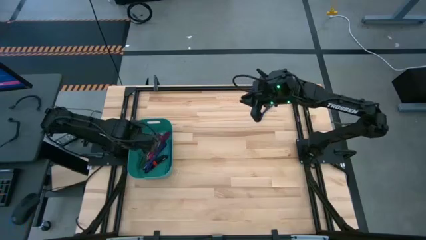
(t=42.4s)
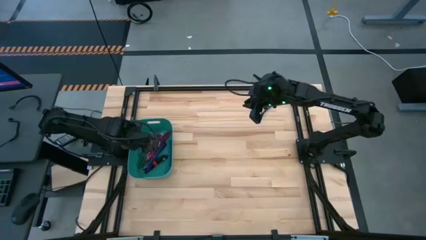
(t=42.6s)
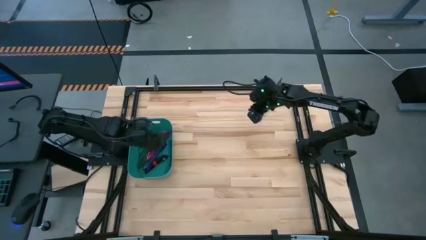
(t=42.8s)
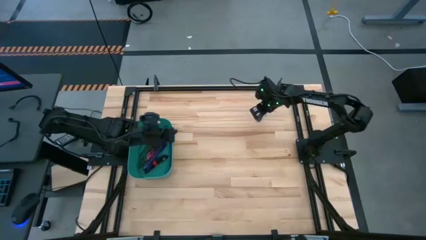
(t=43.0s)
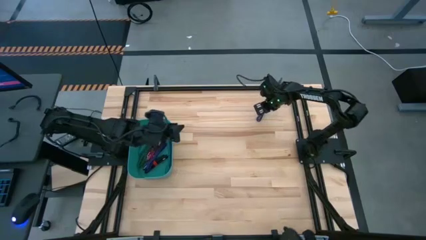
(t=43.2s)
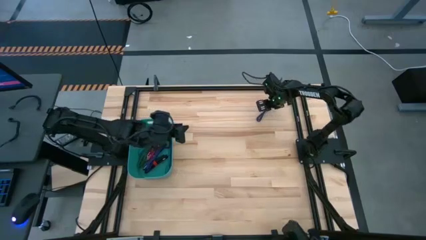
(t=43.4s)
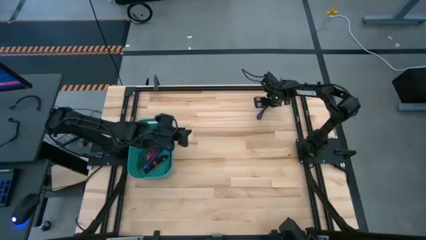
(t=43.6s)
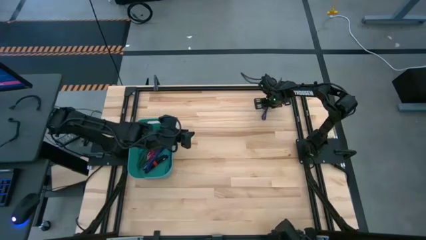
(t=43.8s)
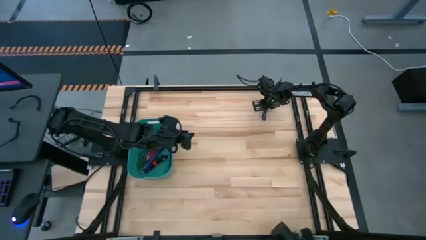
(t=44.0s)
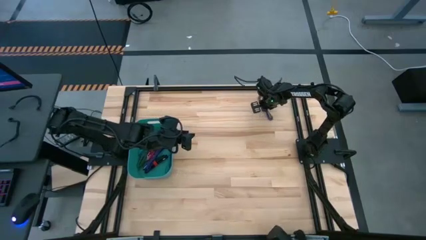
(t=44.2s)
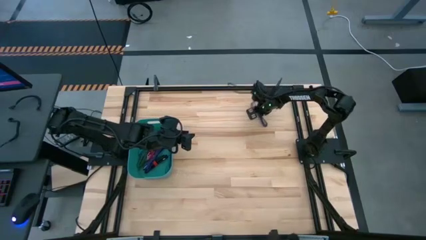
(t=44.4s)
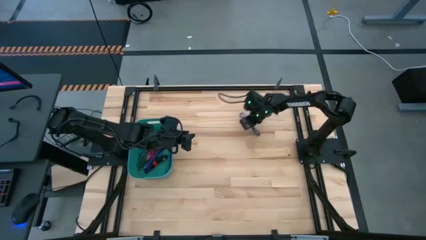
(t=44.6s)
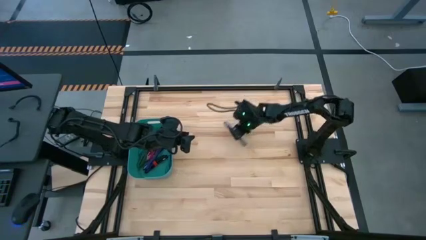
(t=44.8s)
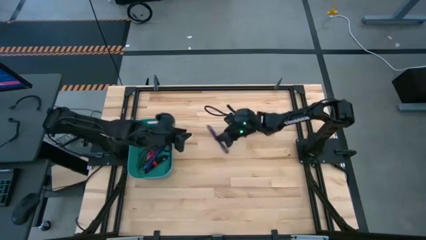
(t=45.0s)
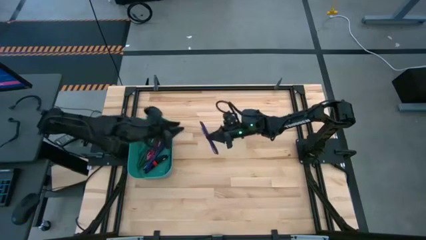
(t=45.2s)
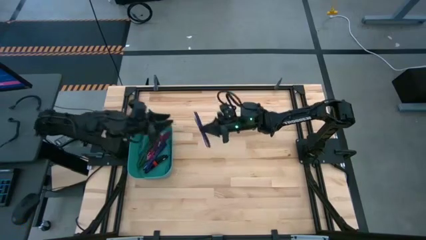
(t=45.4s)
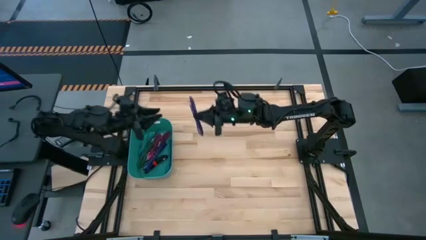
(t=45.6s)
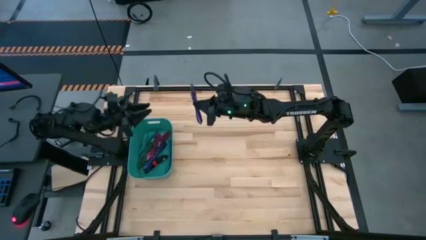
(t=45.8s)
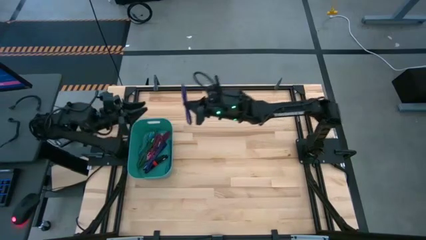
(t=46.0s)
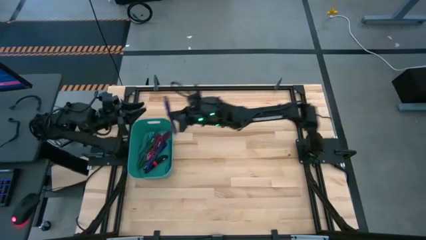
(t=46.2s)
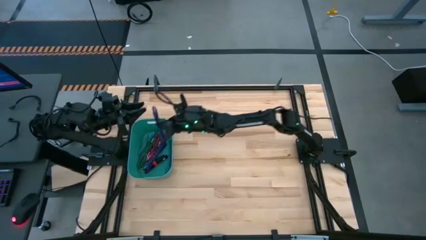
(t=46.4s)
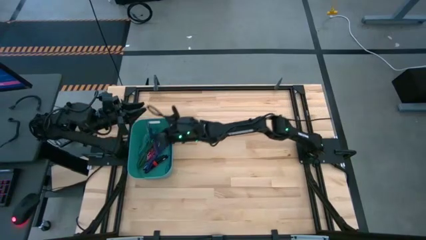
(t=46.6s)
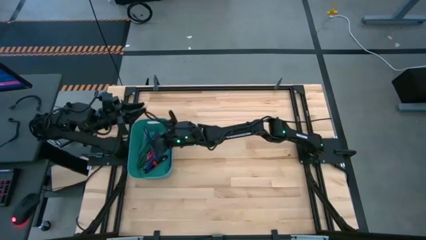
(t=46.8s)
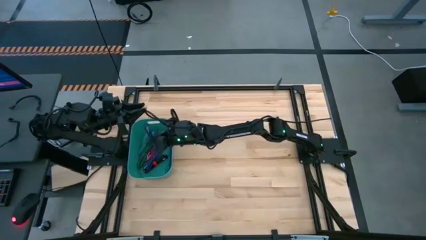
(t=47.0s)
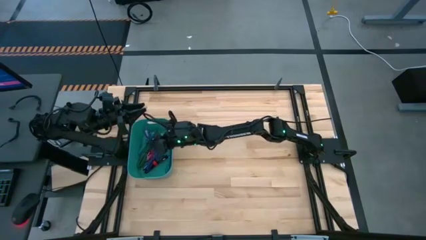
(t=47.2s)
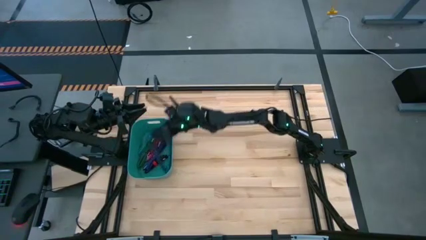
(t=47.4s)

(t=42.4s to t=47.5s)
Task: Pick and place USB-C Cables
Put the purple charger cable into the blue bin

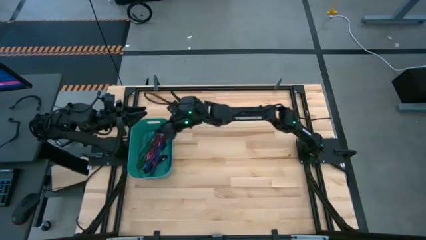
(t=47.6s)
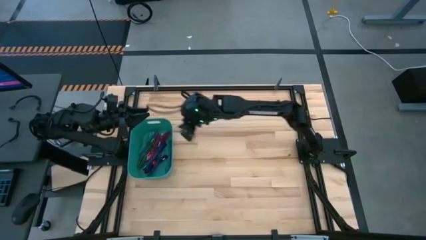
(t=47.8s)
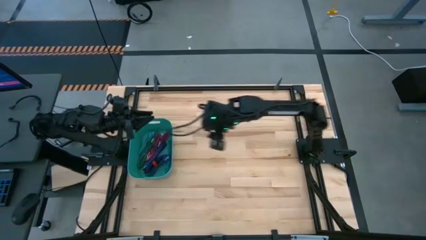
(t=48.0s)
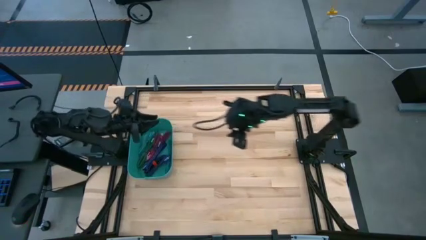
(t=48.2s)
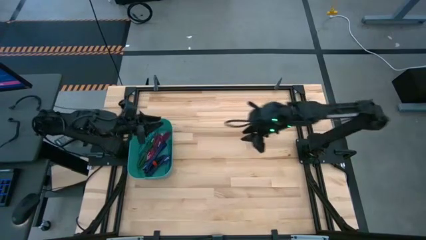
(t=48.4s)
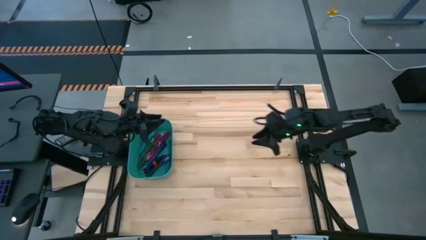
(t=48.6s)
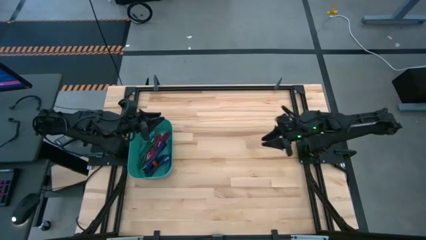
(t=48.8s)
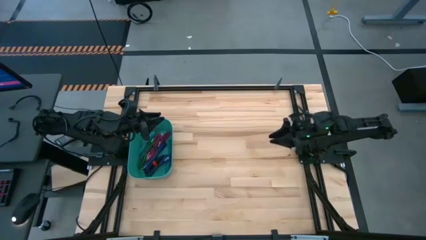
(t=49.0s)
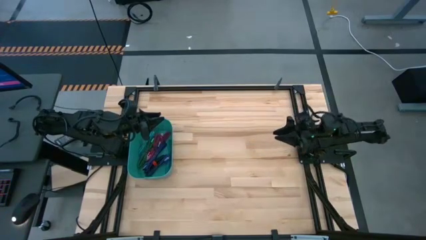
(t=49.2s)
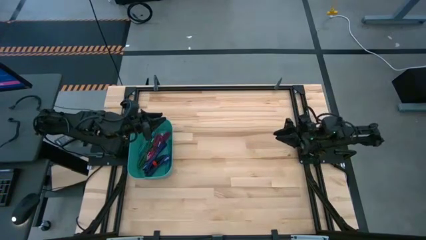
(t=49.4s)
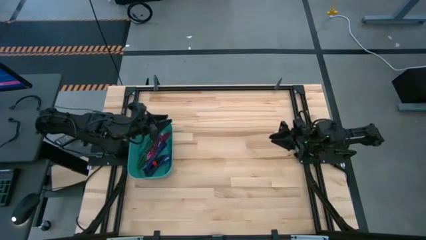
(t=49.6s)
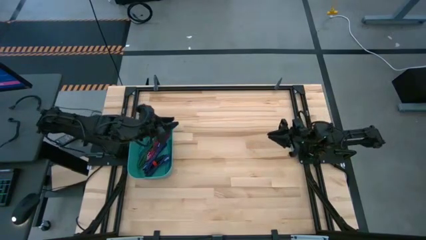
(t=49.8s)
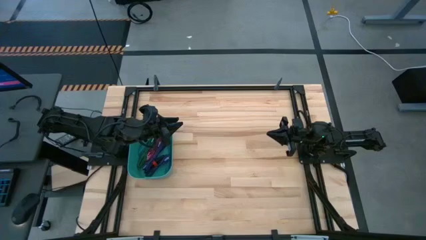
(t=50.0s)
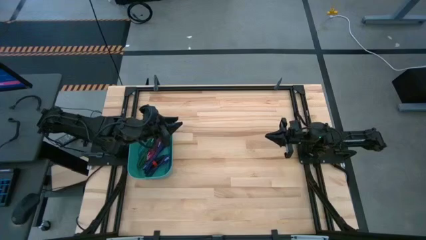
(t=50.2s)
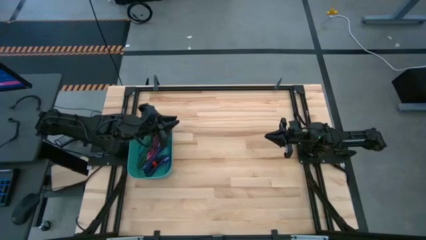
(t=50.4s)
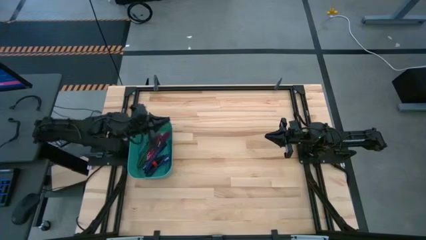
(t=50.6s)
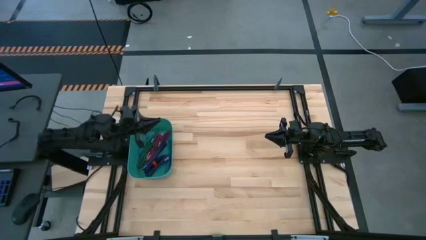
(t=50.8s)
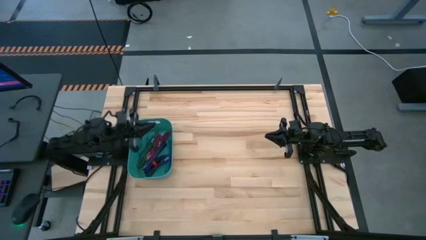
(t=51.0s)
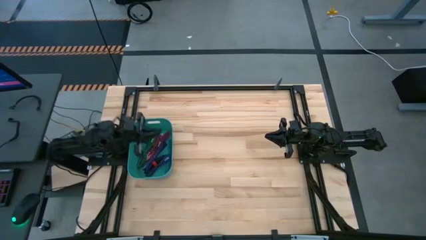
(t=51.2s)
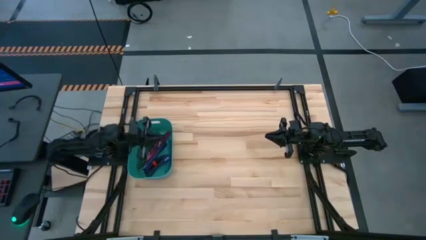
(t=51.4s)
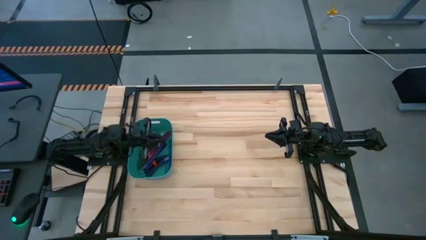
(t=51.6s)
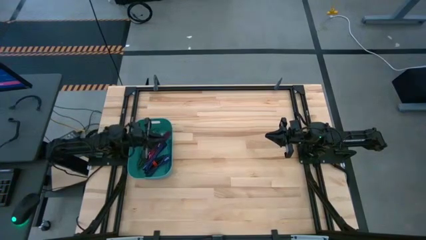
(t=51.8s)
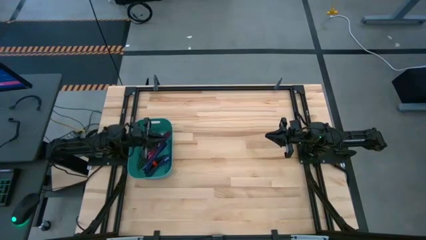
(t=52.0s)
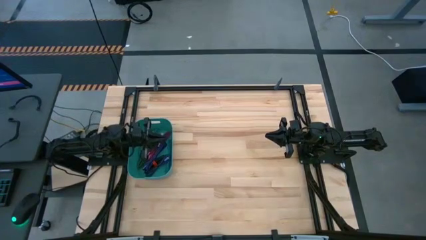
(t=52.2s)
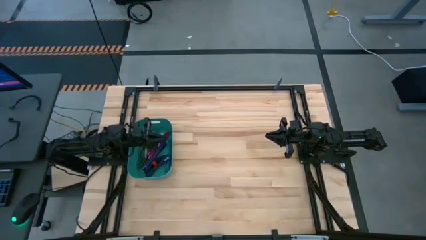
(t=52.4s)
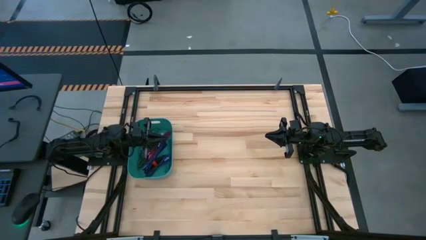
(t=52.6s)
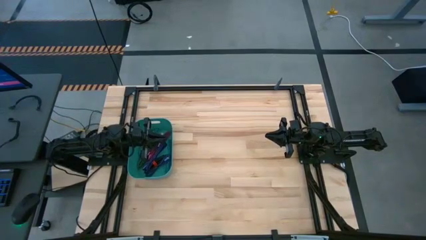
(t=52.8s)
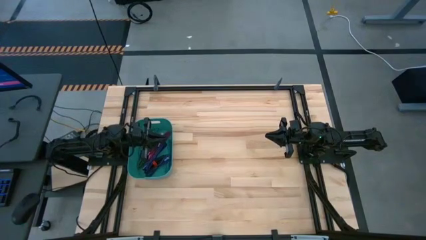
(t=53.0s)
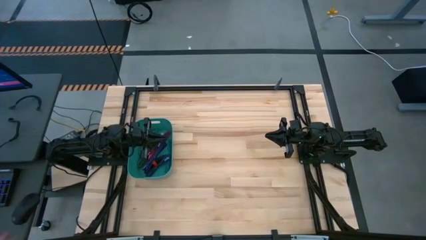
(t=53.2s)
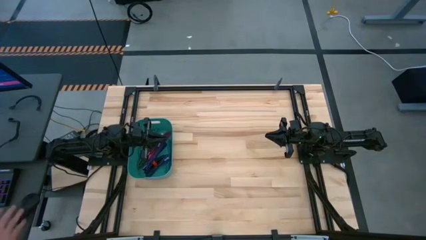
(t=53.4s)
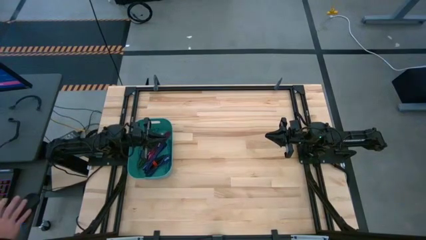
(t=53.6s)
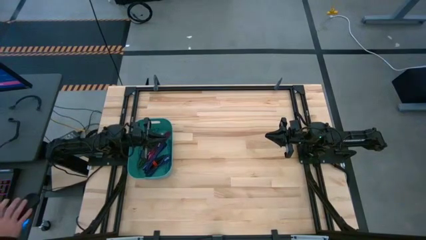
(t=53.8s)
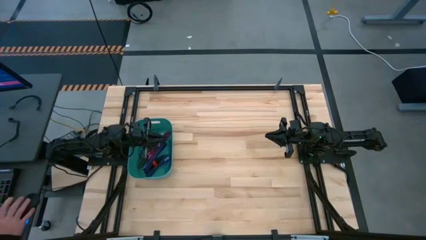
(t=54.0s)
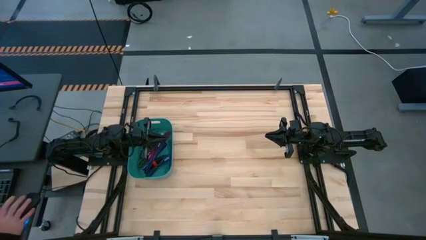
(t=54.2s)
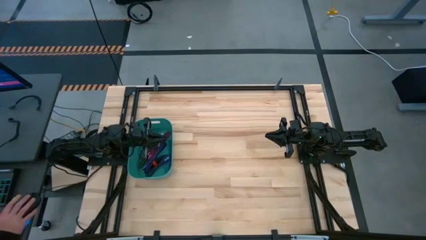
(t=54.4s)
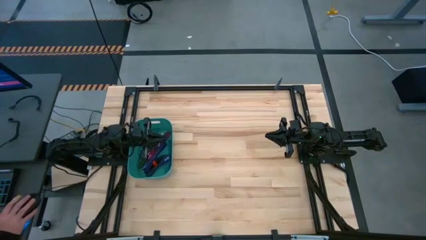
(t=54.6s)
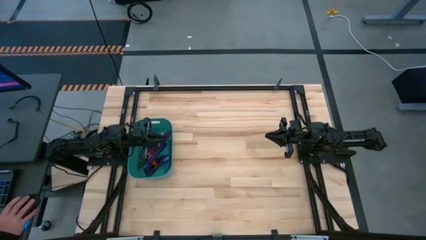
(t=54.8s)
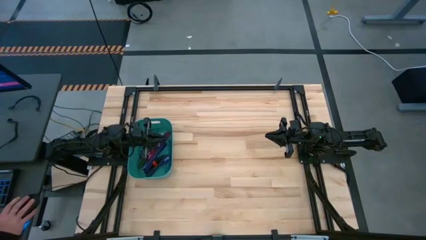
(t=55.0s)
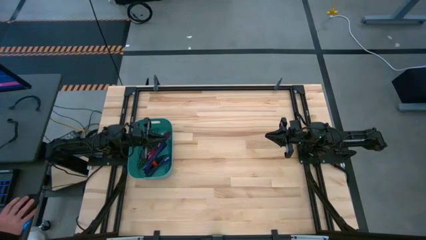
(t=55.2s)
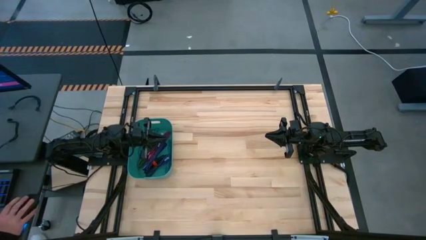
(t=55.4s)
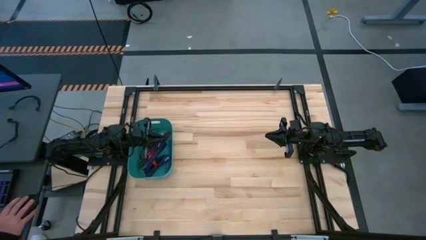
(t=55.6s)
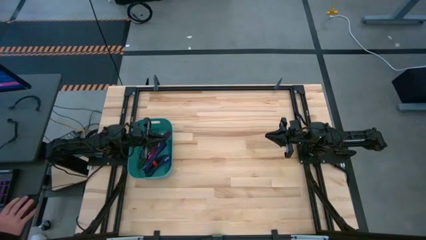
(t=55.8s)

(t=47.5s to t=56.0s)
Return to Home Position

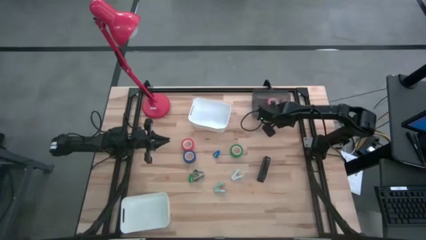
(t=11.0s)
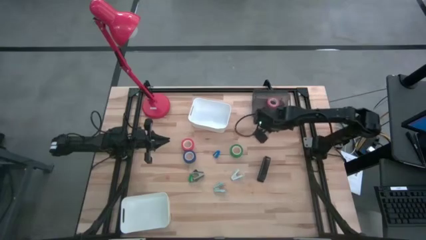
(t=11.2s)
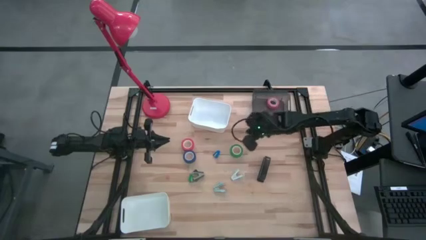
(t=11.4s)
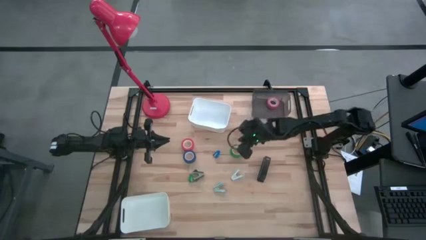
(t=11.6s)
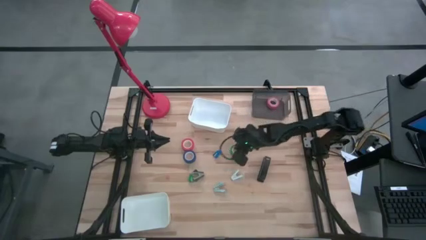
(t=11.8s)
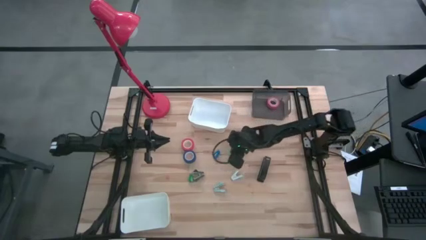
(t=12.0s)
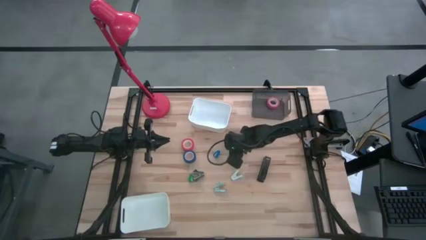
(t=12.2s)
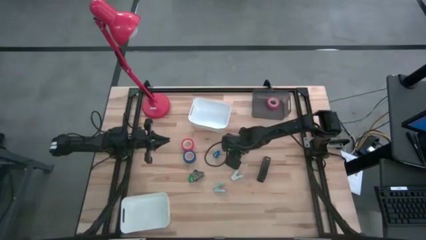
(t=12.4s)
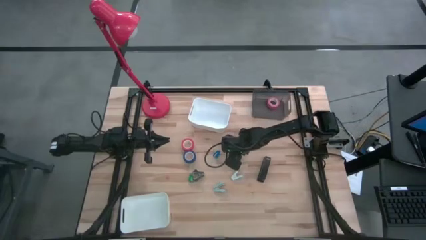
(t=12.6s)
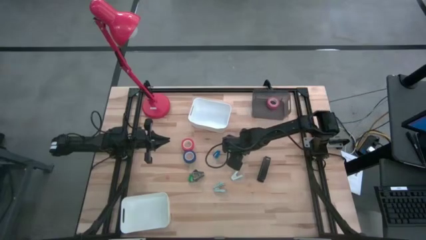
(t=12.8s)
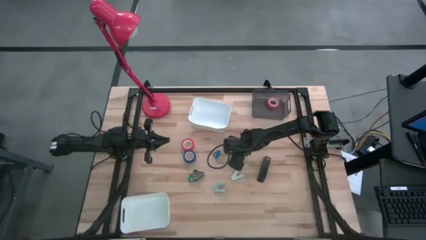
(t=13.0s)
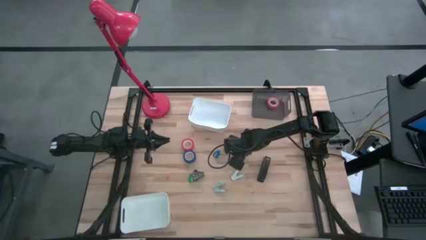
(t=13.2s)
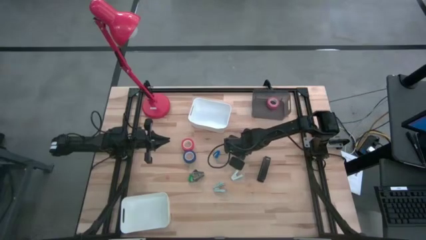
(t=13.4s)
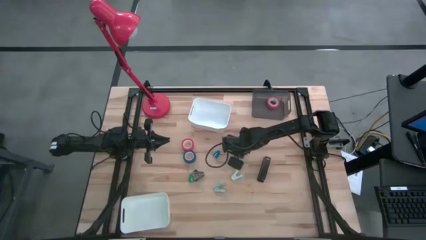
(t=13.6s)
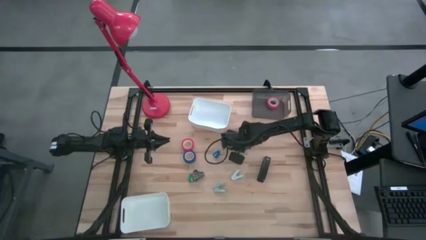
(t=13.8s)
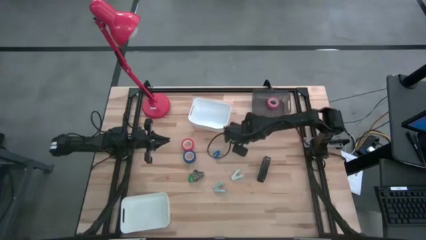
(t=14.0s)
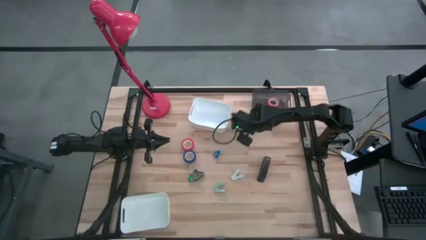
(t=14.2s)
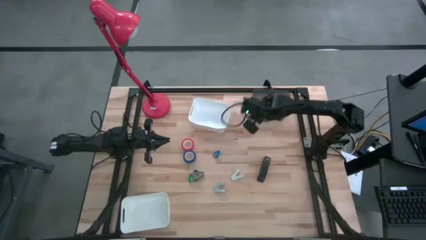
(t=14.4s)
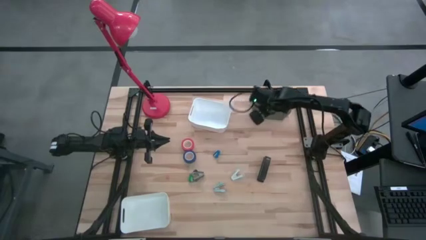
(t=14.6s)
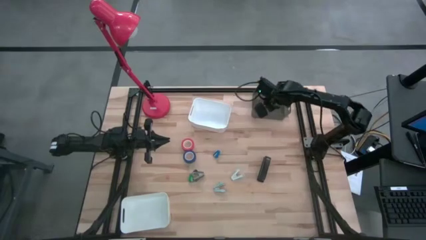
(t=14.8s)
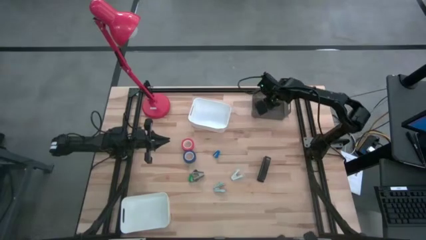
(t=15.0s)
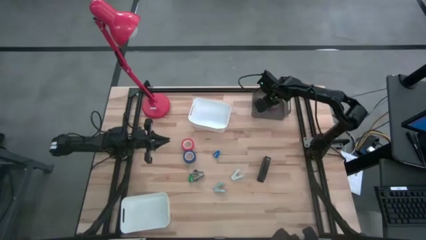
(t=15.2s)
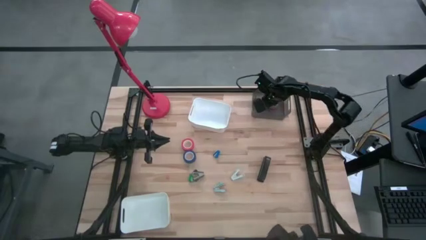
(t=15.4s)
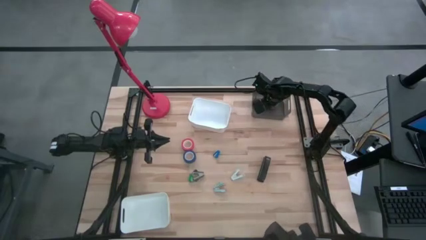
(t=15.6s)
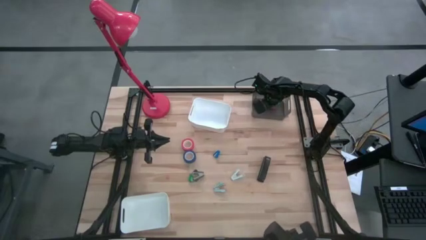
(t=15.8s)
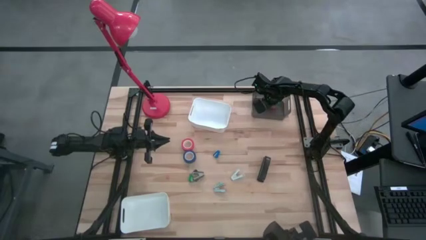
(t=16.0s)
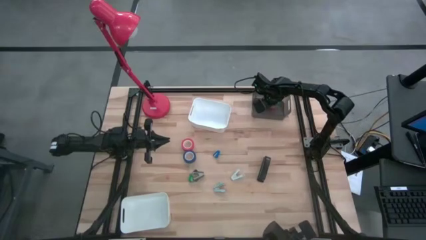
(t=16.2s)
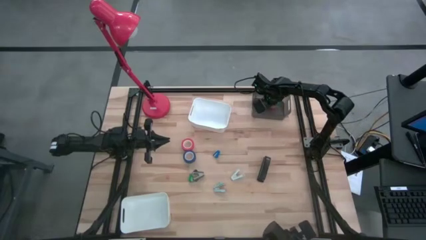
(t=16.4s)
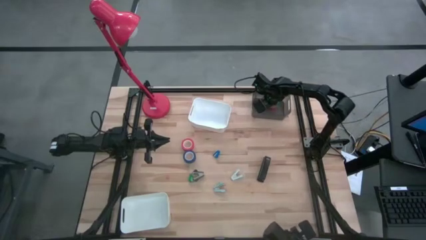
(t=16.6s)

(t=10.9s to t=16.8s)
Task: Pick and place Stapler, Stapler remover, tape
Put the green tape into the gray bin
